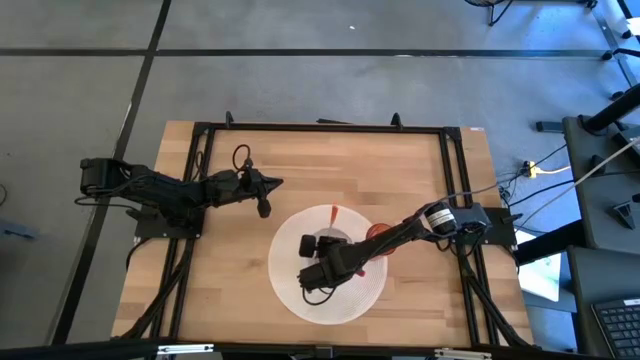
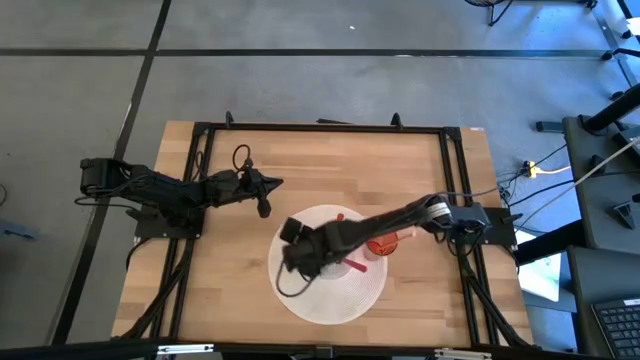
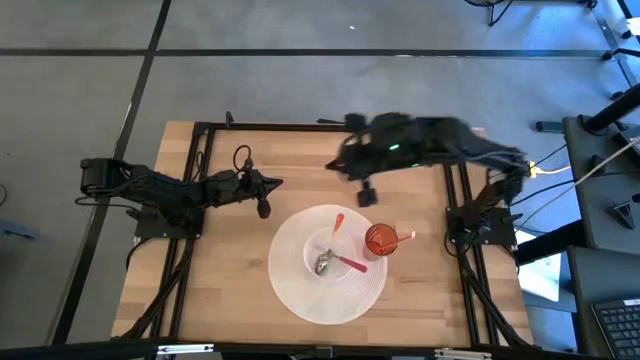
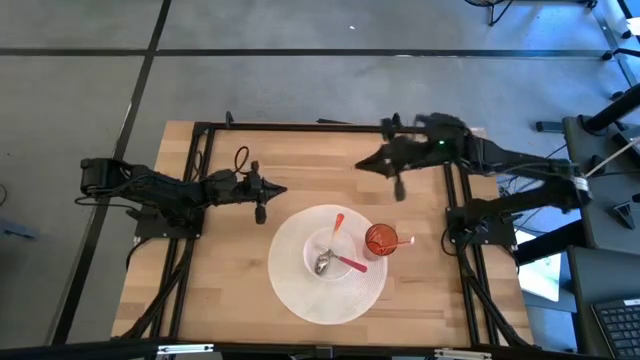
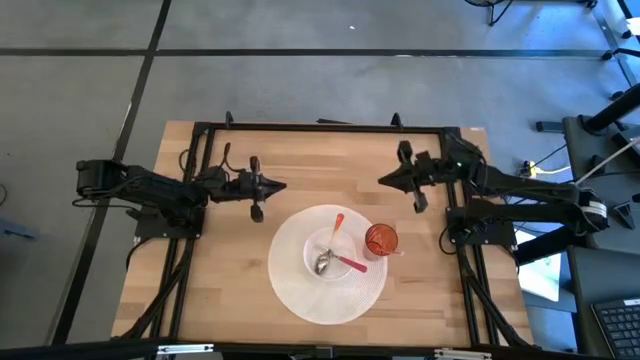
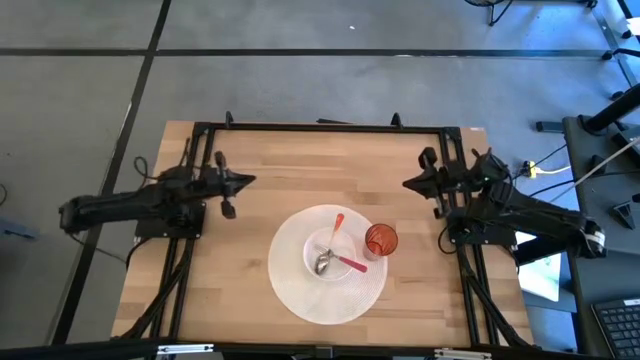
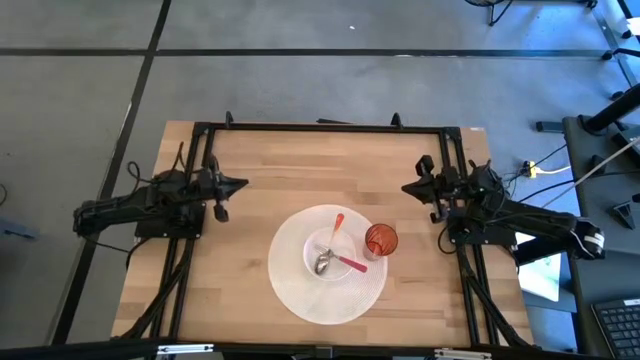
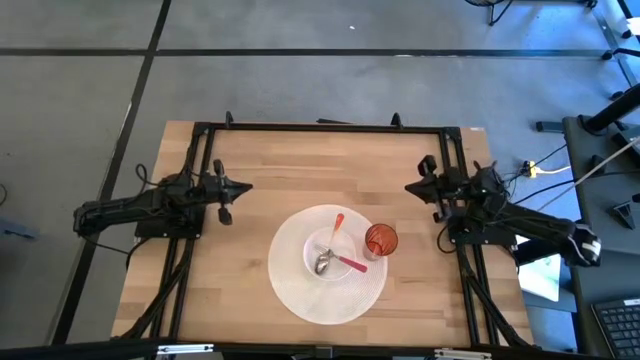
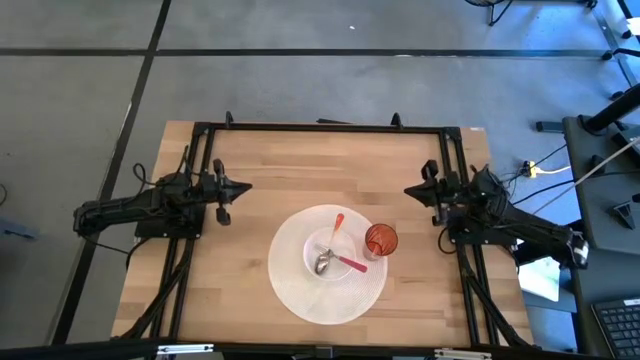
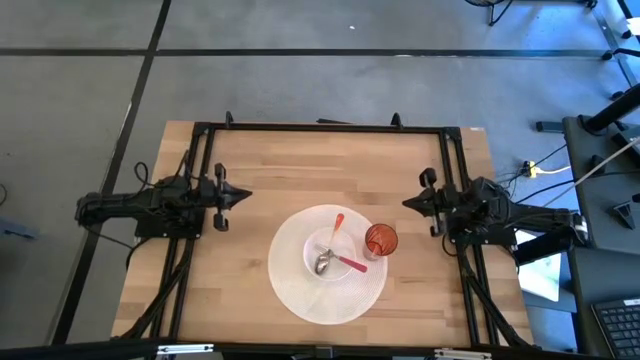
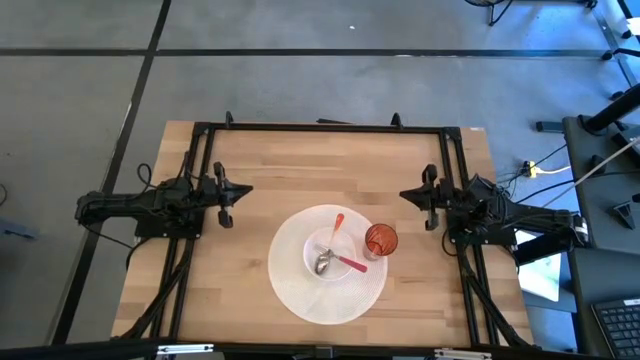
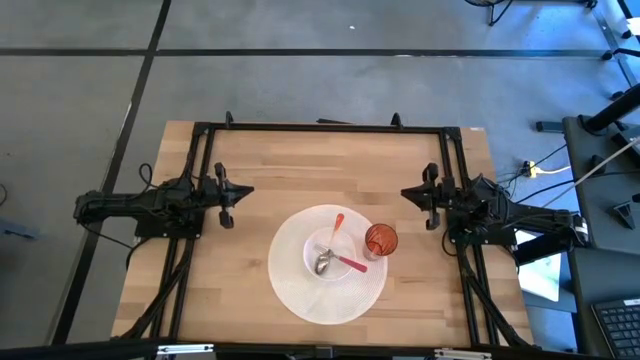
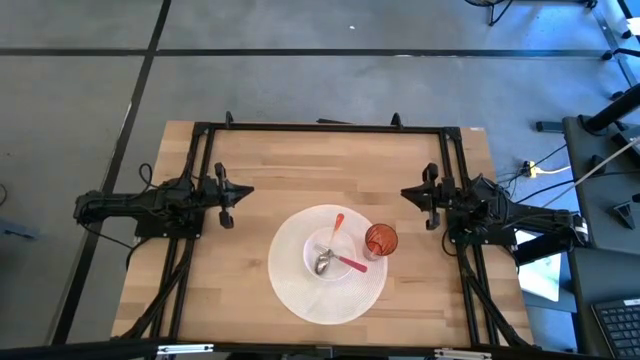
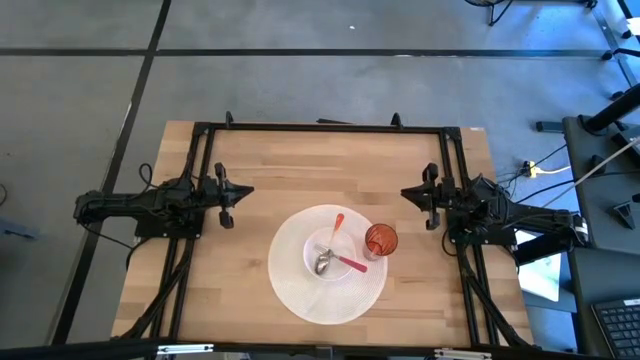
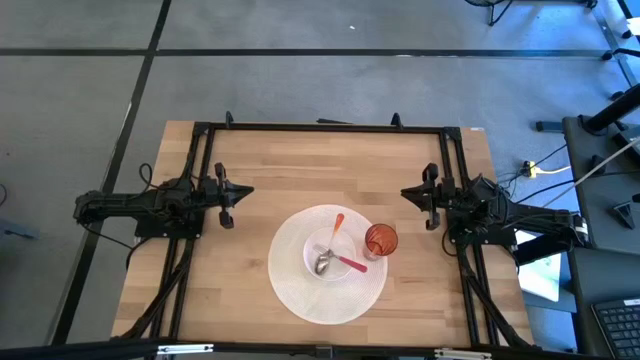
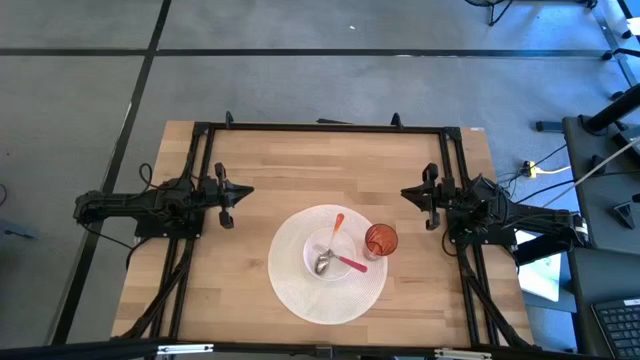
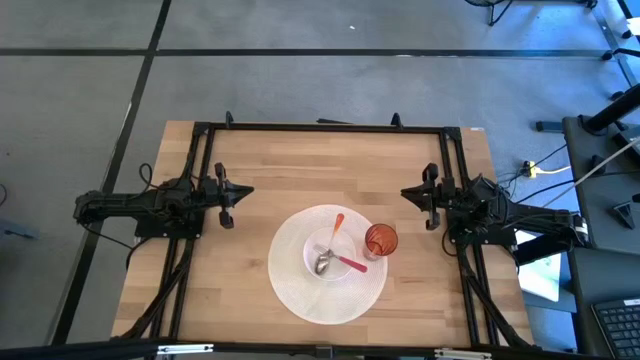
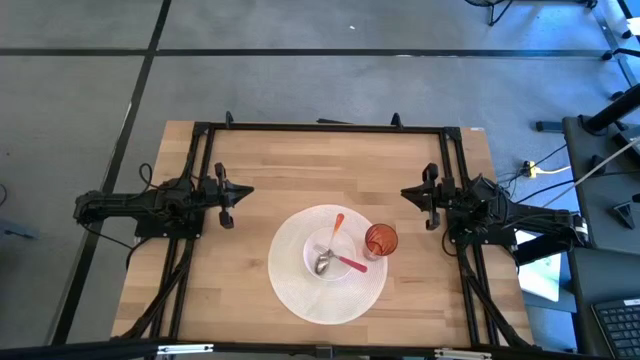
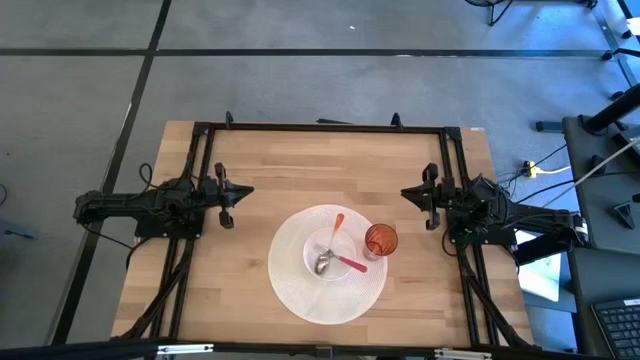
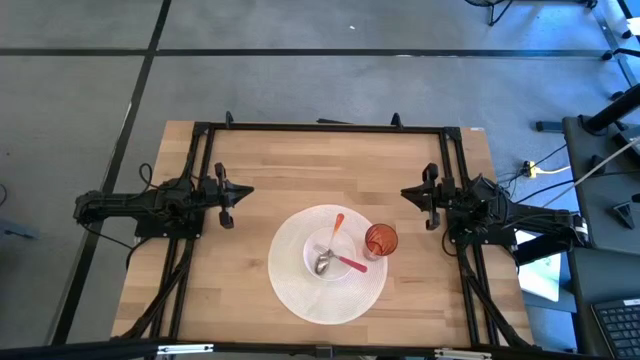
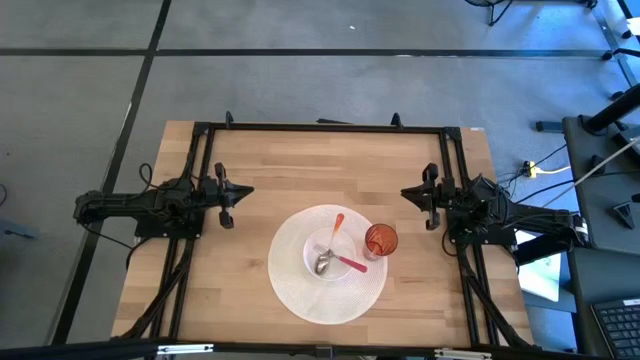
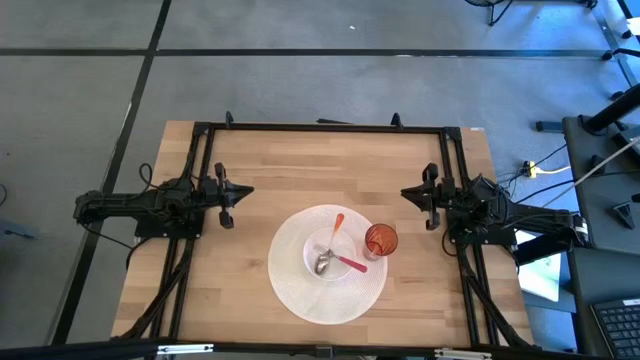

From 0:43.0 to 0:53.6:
Task: Pick & Place Utensil
Return to Home Position

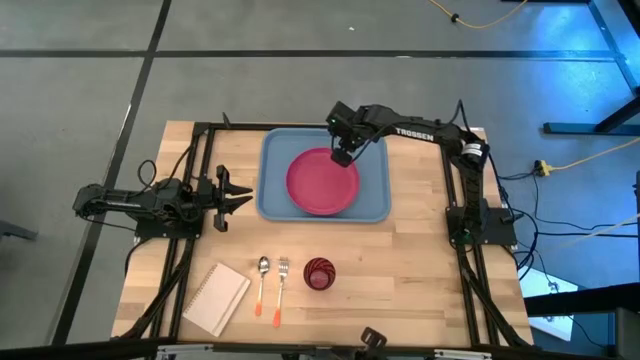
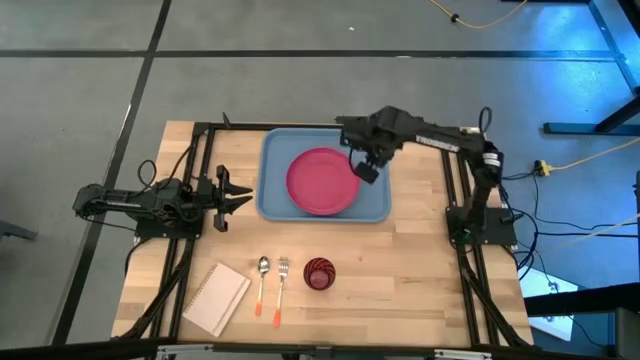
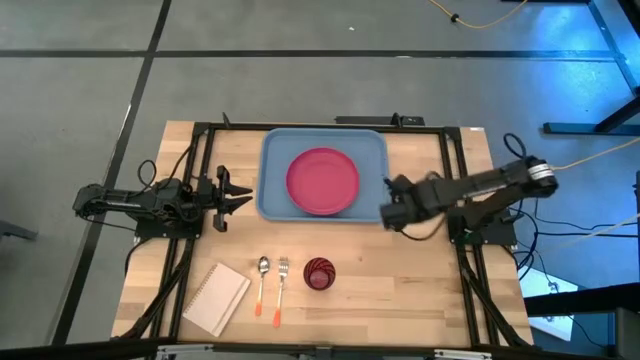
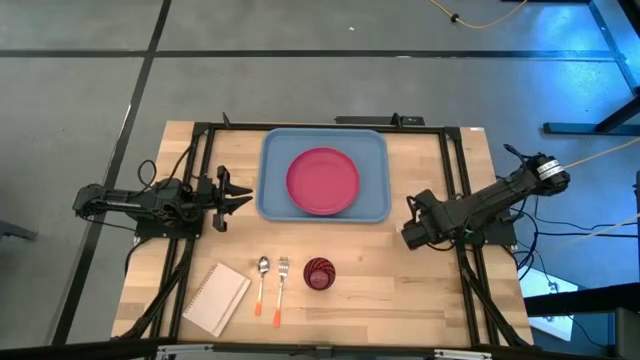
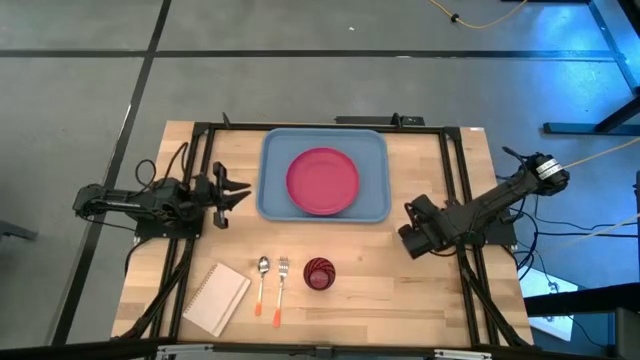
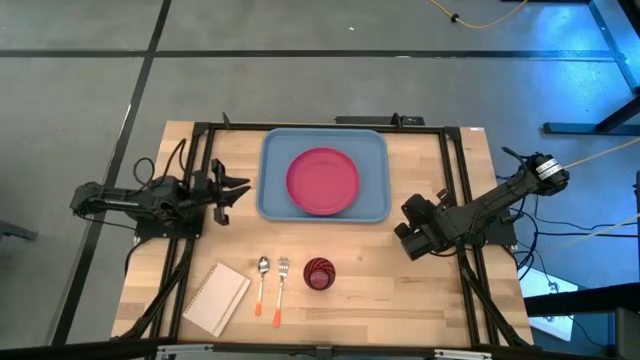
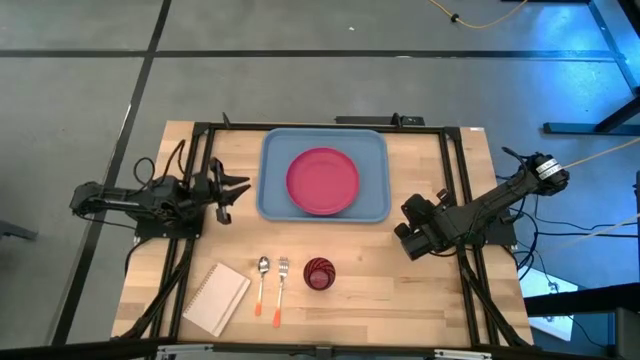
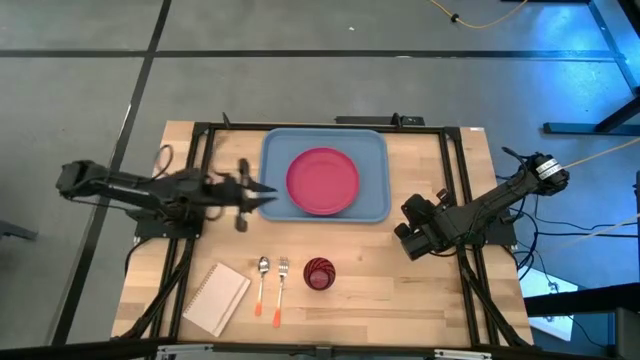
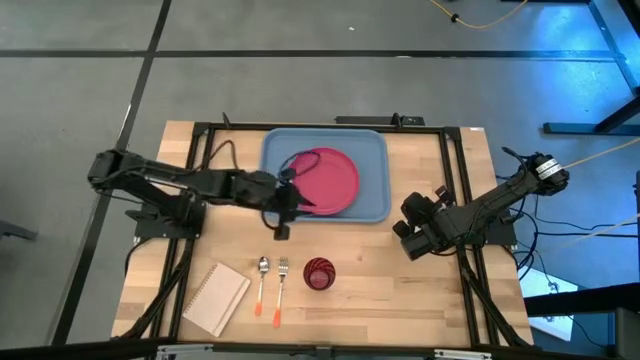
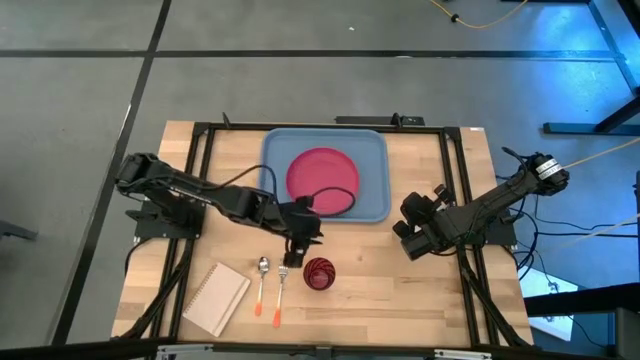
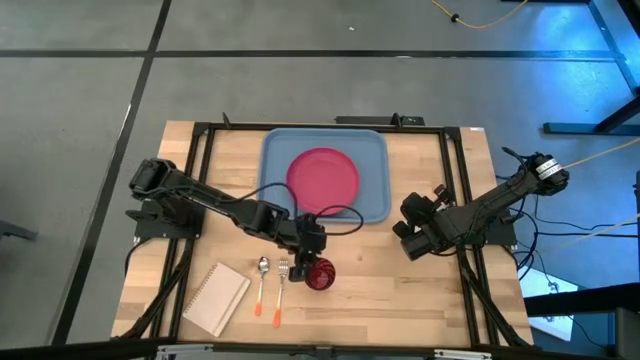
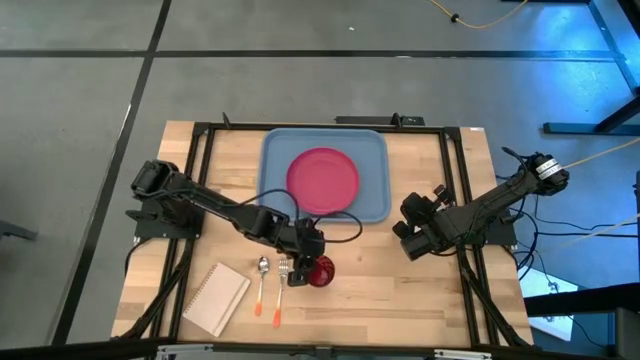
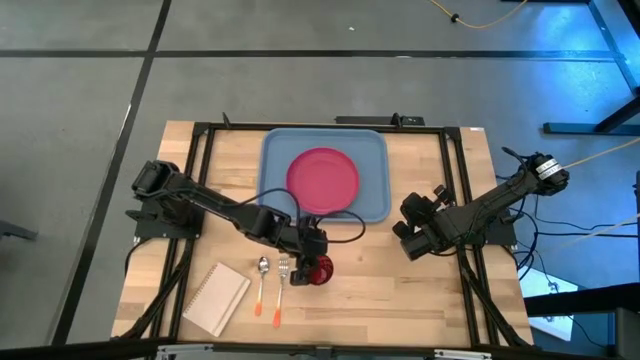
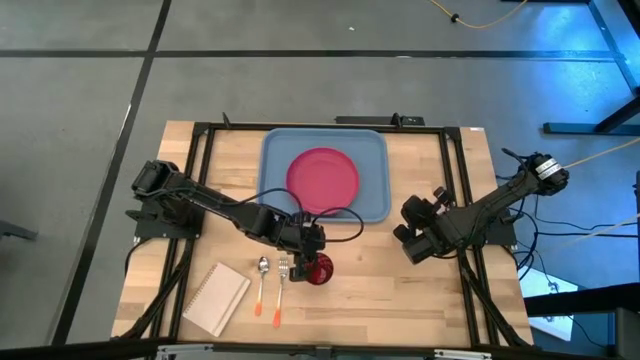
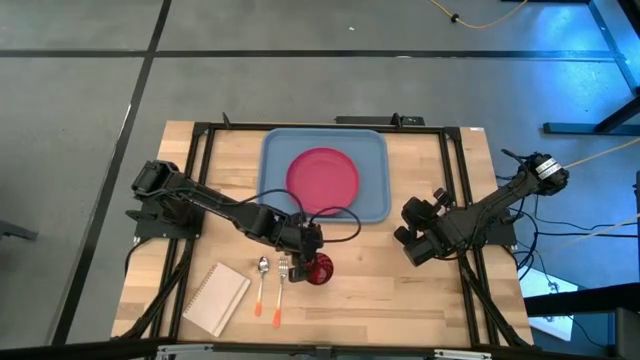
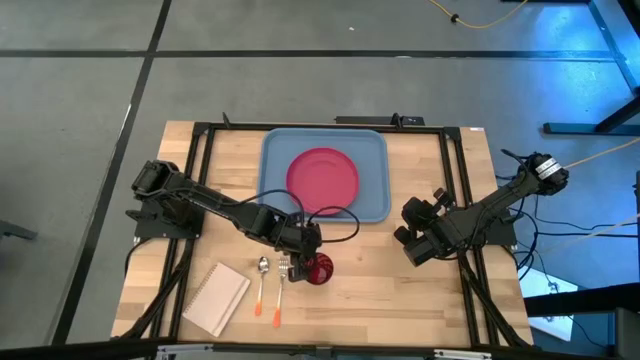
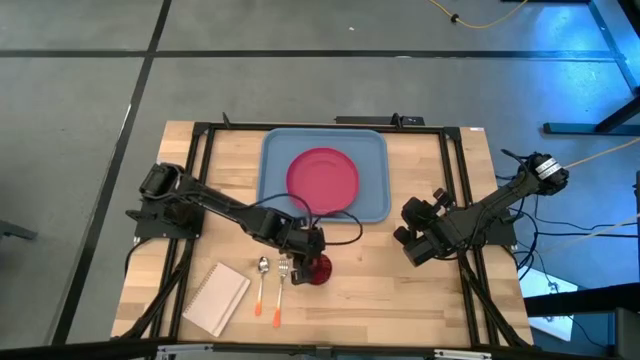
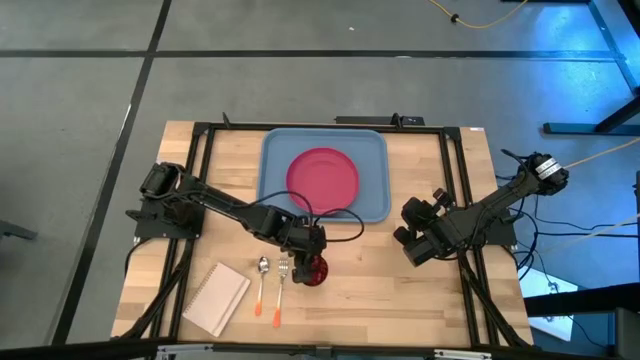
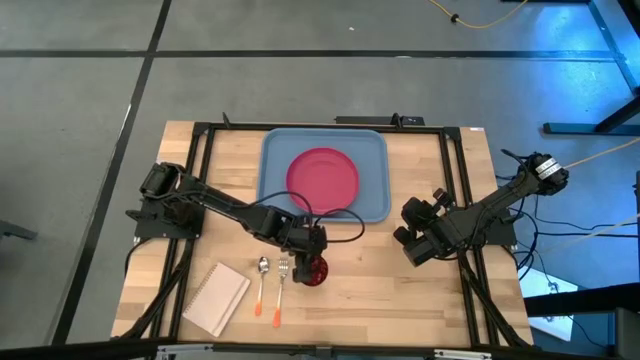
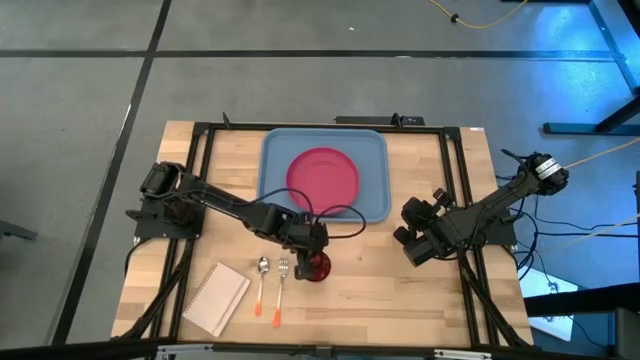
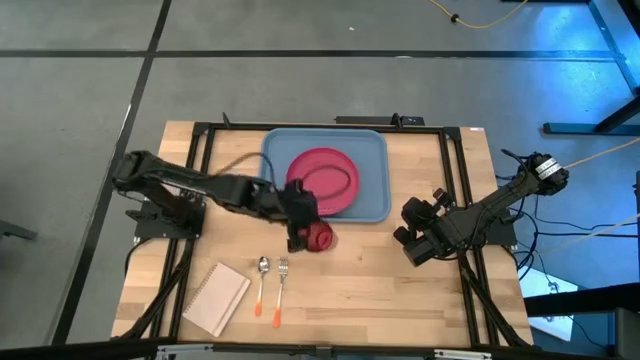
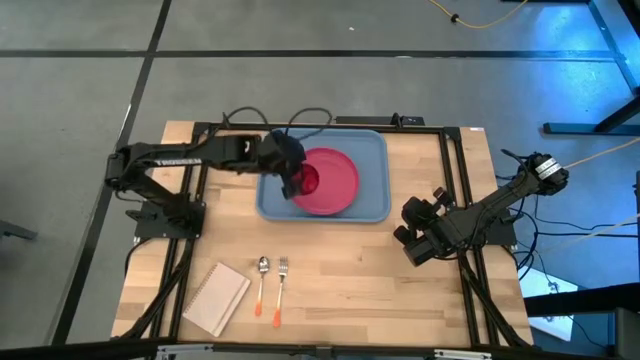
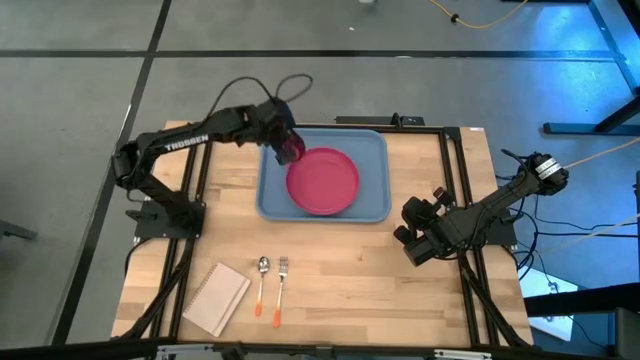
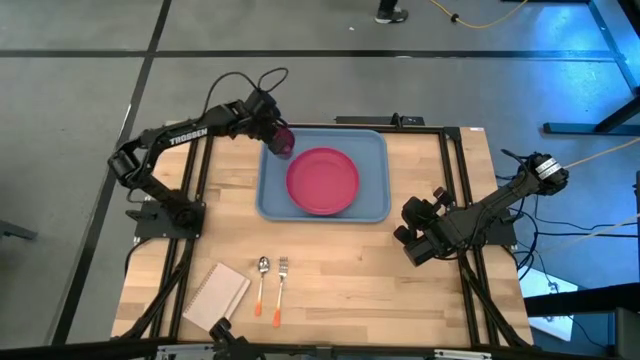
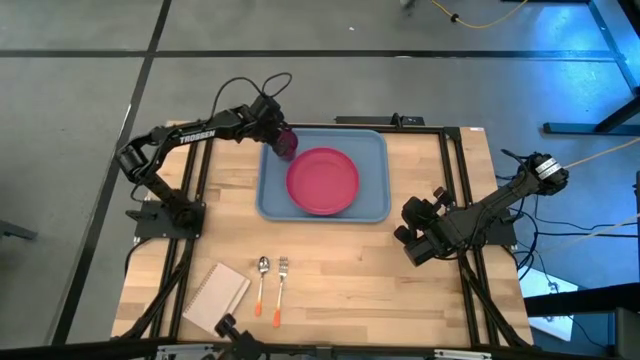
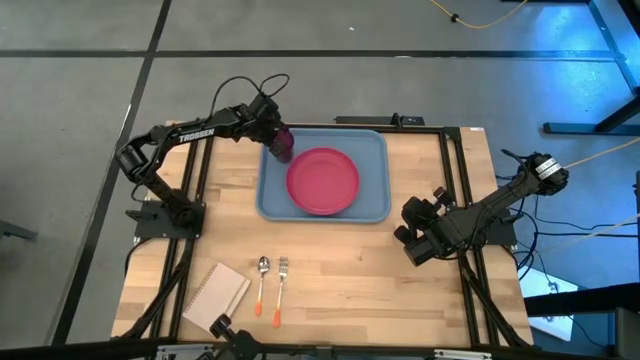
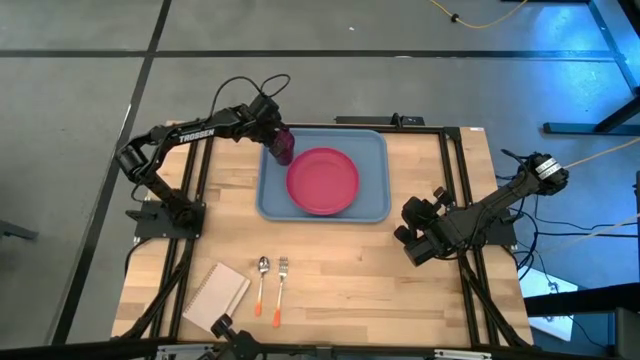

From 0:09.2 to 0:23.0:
Task: Pick and place plate/cup/fork/spoon on tray
Put the red glass on the blue serving tray to the top left of the pink plate
